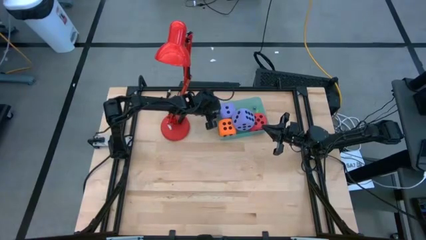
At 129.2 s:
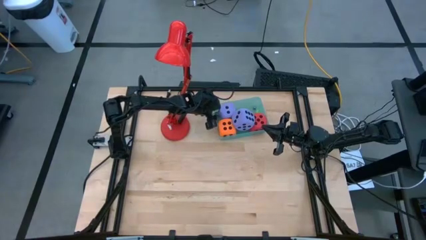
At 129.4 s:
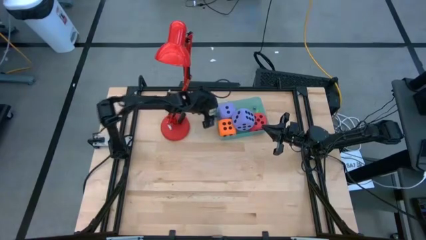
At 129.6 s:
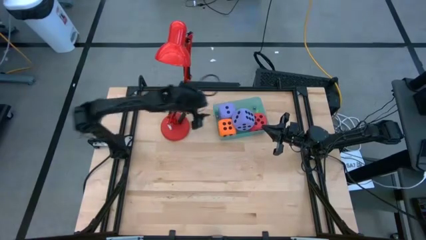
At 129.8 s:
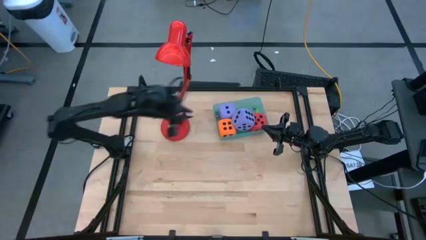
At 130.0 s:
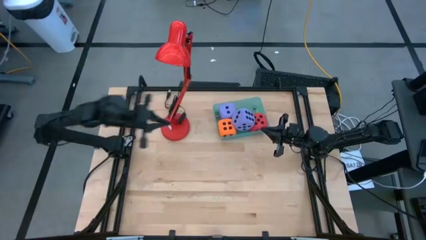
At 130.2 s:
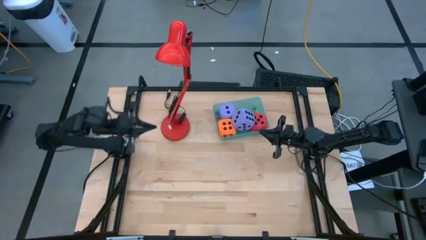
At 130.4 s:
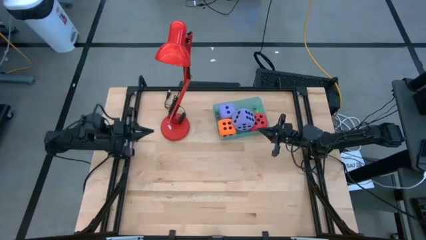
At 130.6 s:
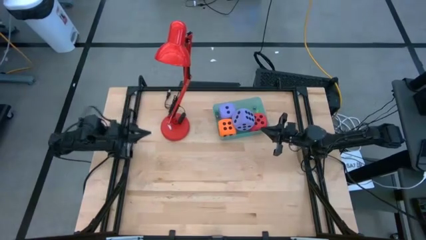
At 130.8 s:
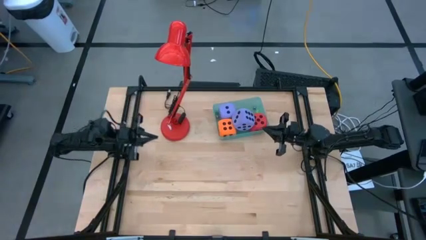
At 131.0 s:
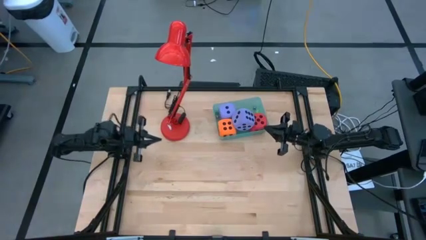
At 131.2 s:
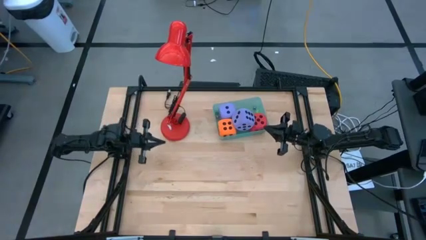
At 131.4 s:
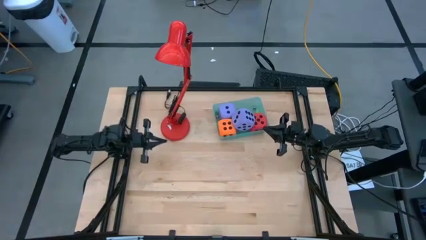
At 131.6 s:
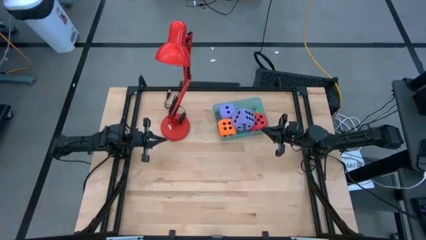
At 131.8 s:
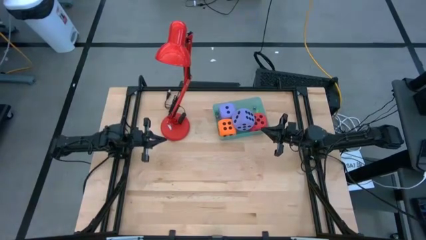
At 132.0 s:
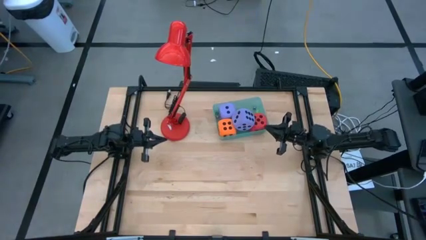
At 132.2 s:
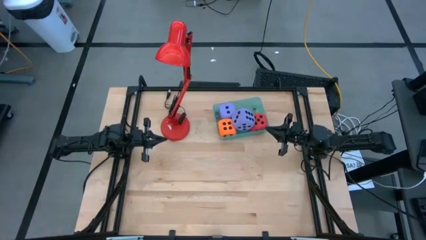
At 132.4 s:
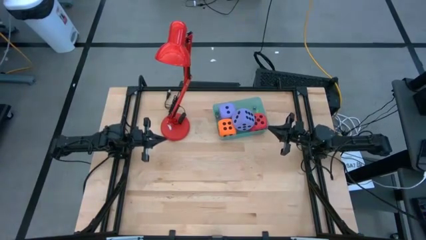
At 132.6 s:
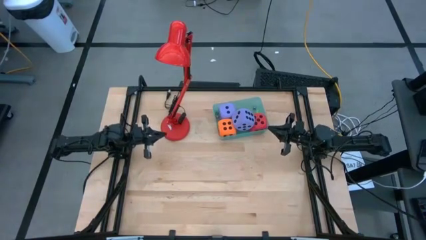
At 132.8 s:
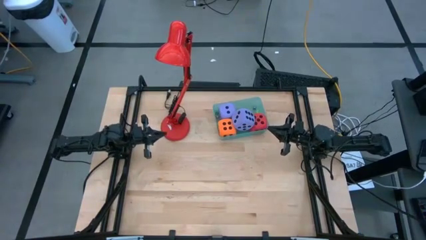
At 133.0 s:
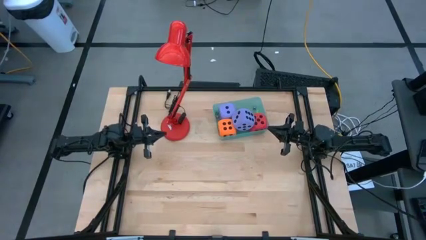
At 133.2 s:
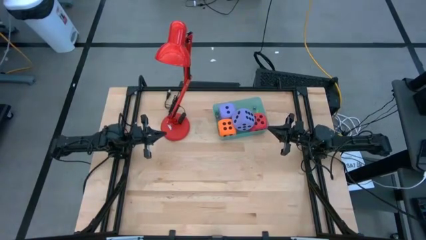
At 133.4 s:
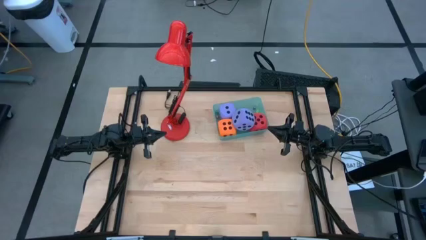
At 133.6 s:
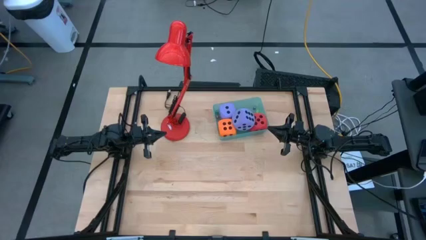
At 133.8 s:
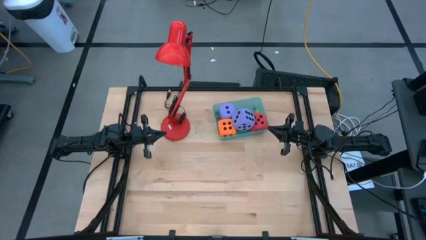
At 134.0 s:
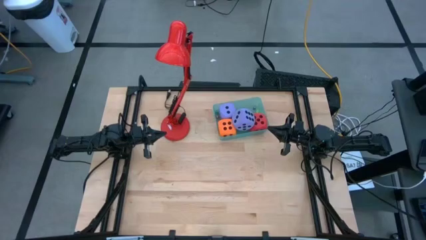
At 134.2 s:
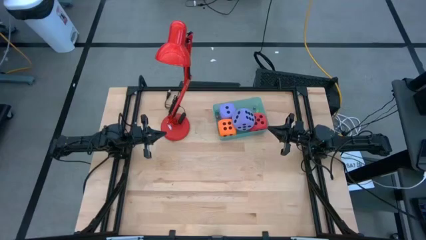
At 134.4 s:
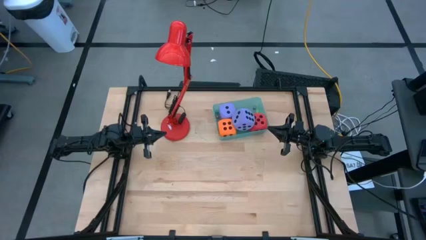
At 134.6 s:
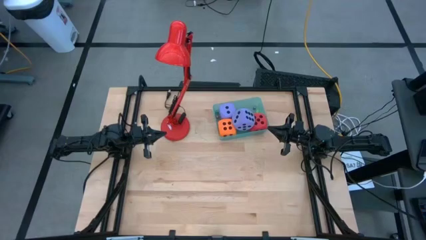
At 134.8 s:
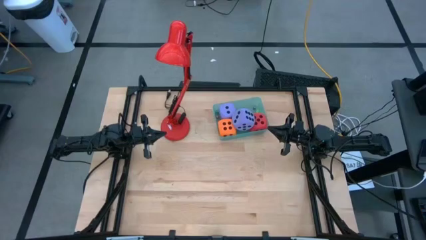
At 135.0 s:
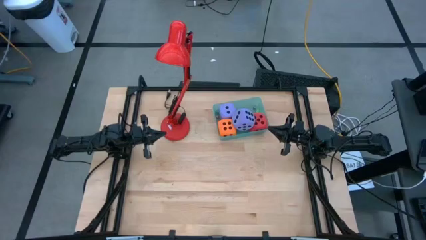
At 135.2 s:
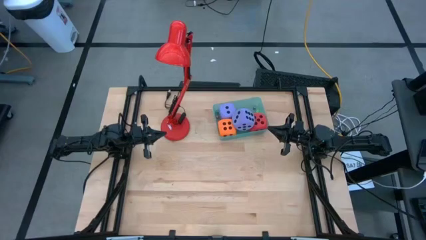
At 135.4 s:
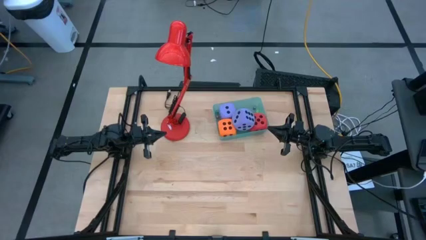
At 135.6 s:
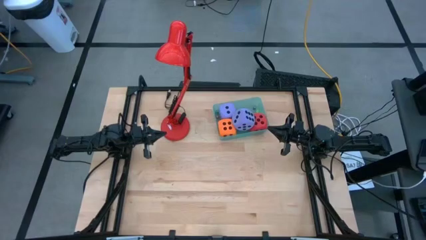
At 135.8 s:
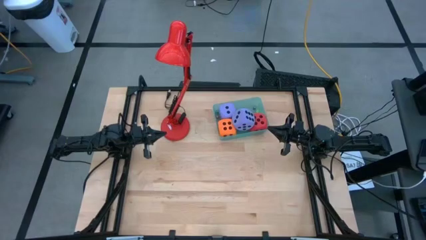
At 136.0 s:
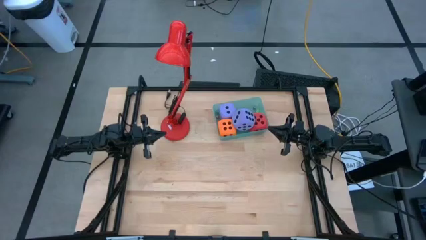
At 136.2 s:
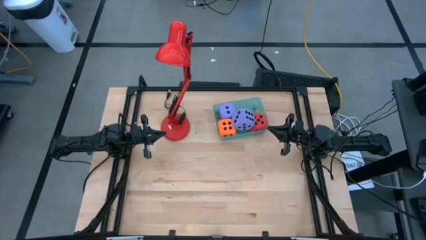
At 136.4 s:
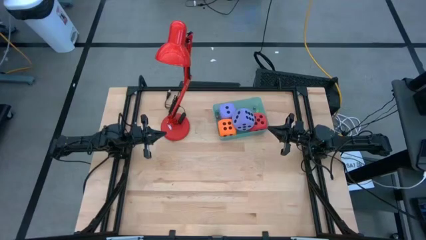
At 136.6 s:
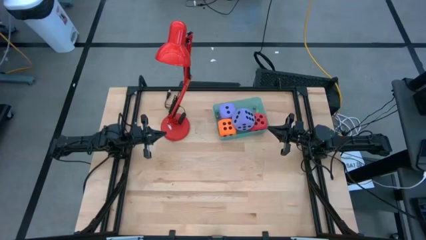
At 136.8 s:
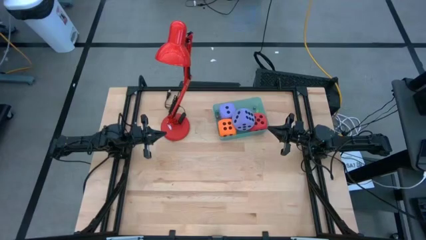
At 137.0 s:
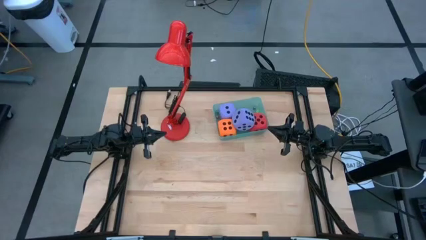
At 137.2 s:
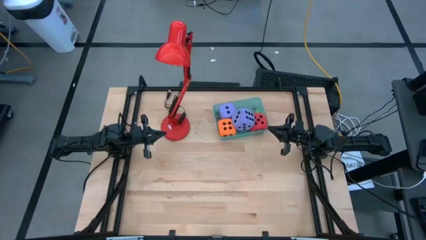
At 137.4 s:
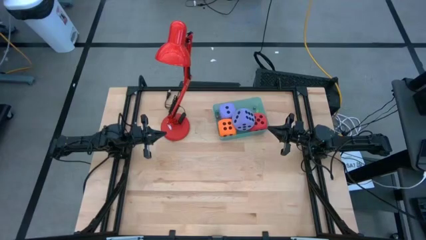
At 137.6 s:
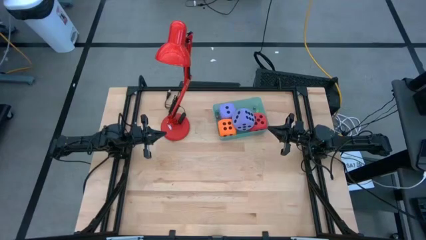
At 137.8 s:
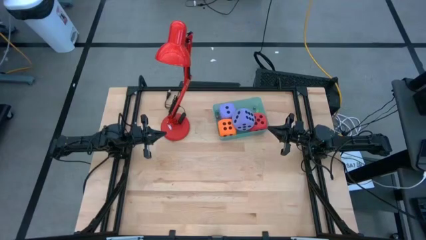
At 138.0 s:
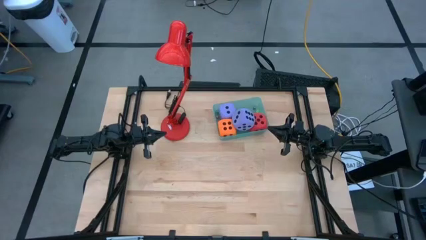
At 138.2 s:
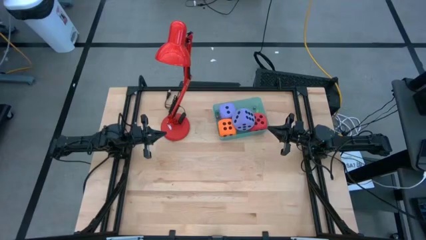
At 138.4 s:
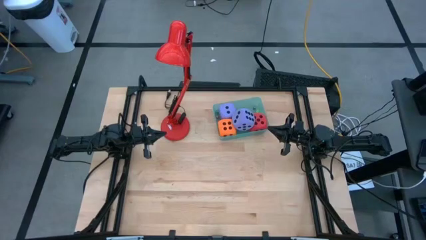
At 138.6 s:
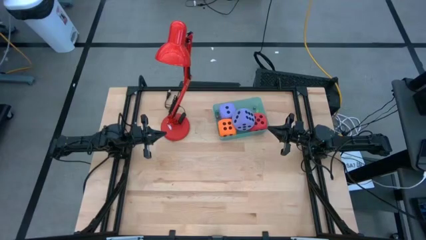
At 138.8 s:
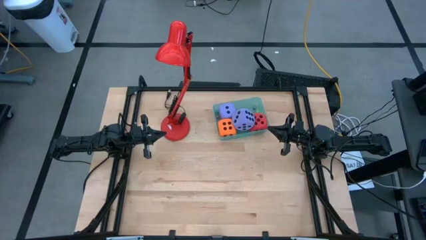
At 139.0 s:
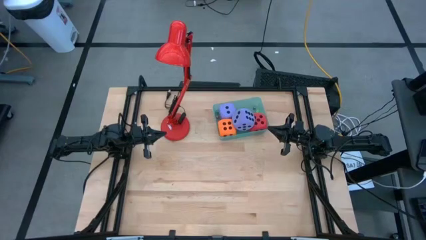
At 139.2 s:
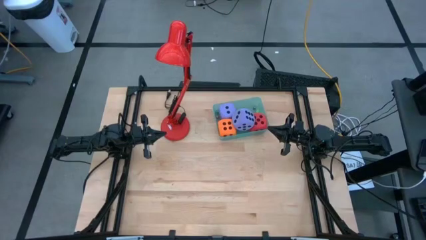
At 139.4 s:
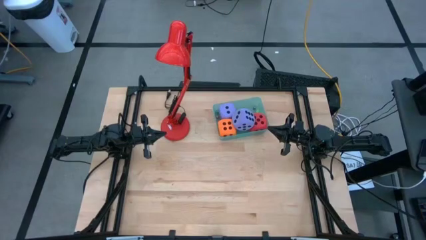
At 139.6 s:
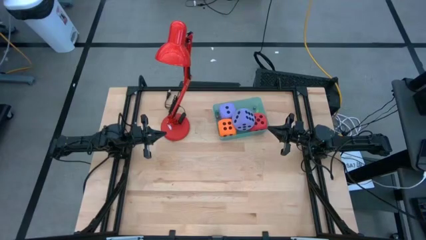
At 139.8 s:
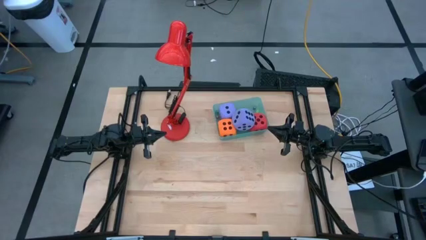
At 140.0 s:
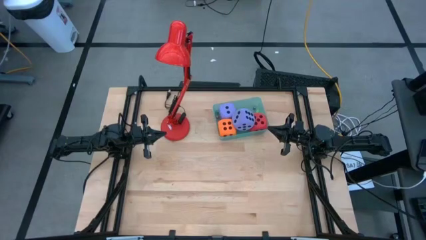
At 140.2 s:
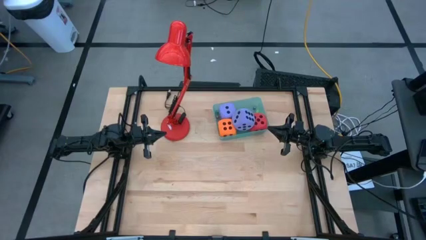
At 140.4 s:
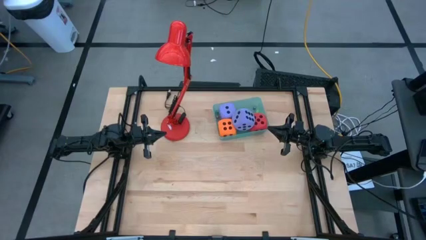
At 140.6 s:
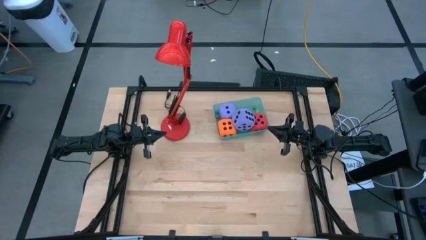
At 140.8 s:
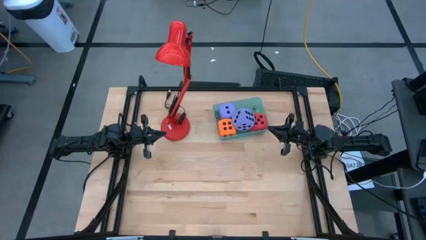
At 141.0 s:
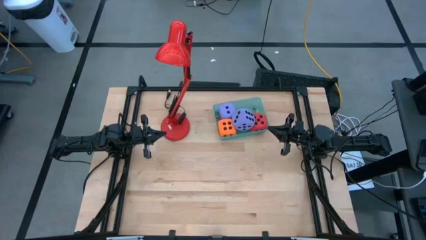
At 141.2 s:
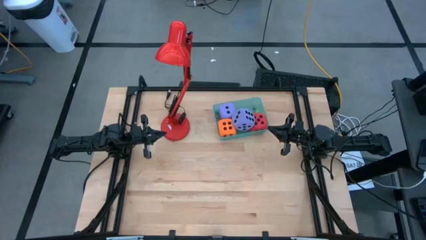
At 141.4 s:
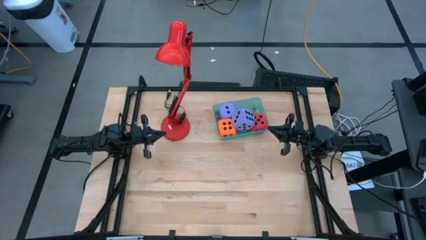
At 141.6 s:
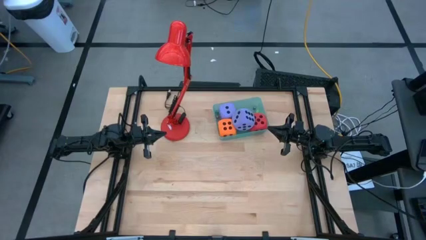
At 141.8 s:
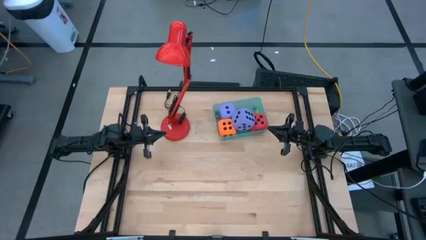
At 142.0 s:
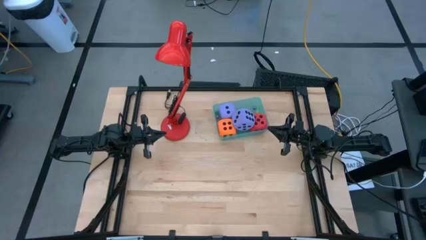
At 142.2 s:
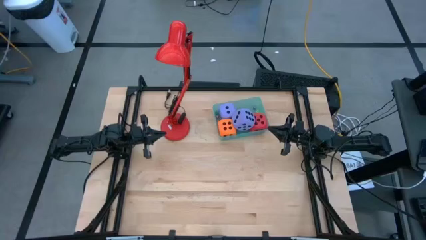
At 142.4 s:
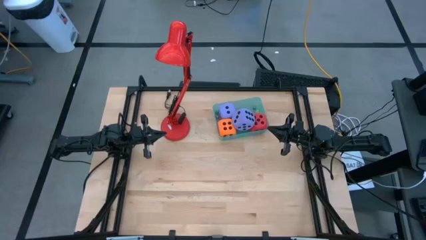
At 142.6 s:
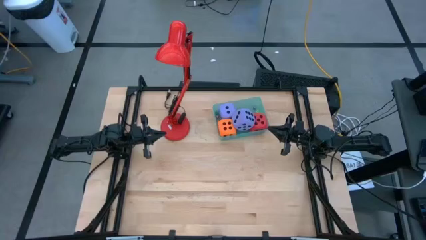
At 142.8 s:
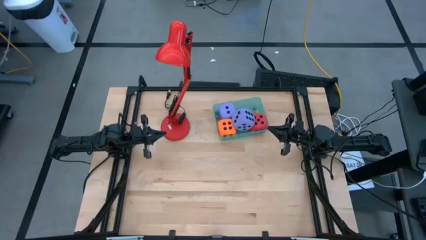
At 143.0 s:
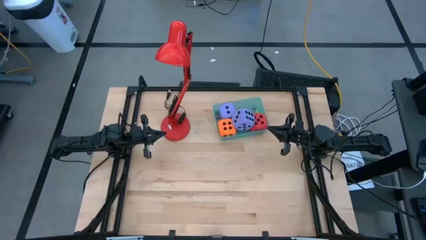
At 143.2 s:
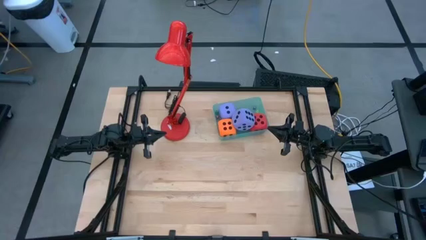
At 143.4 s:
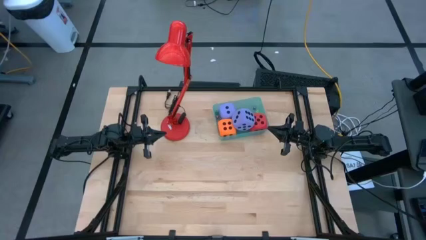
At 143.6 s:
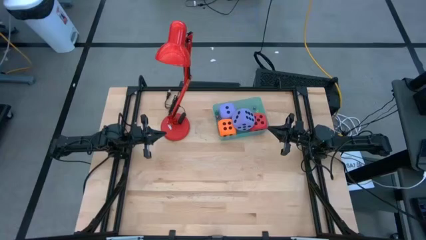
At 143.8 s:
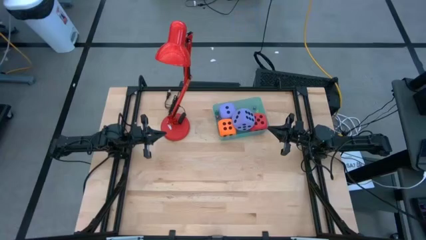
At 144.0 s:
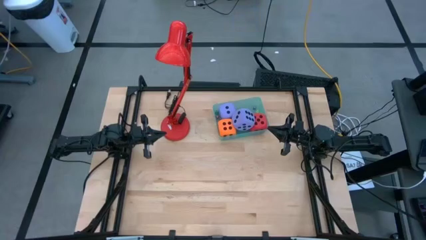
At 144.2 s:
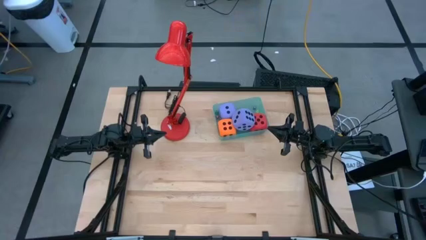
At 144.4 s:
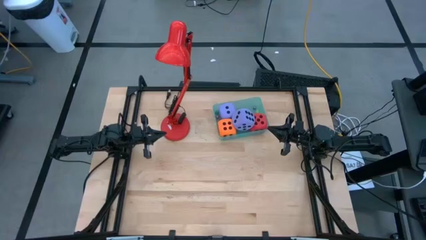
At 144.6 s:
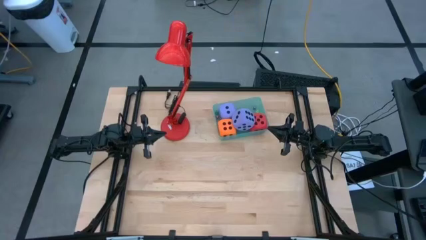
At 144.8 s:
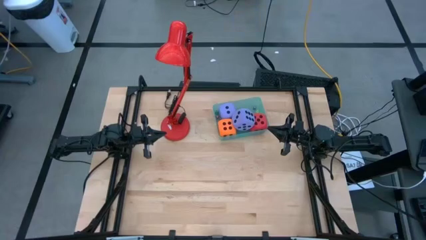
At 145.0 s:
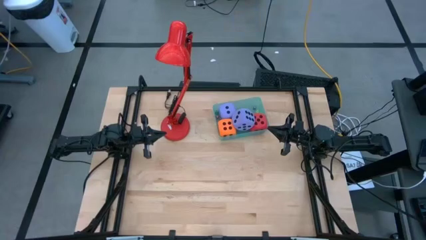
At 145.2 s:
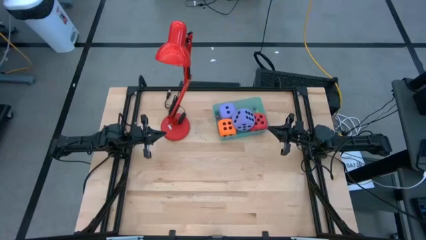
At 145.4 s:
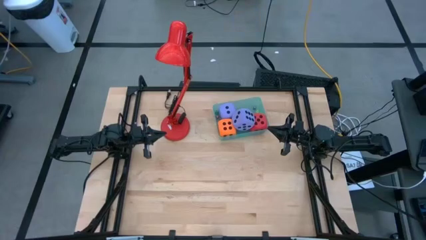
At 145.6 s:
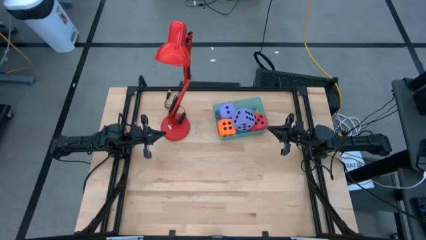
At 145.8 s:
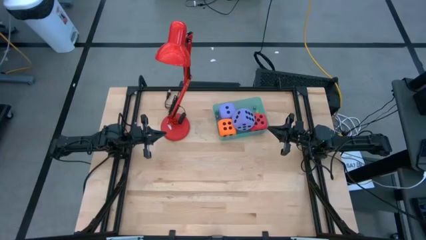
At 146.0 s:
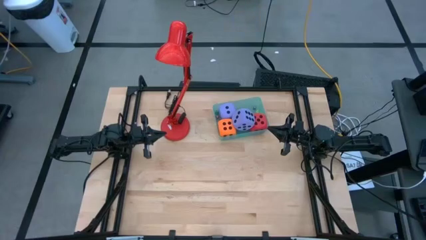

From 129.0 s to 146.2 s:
Task: Pick & Place Dice
Return to Home Position
